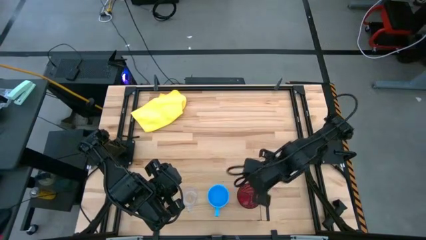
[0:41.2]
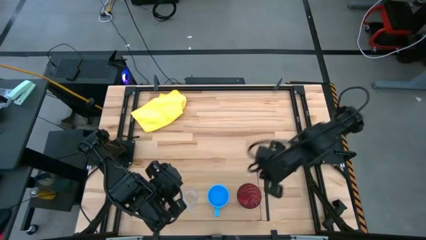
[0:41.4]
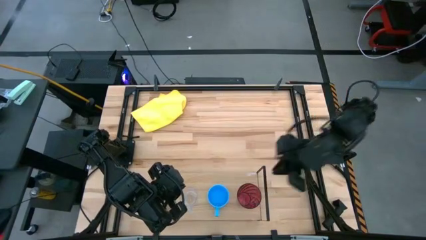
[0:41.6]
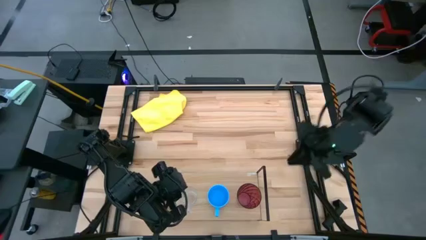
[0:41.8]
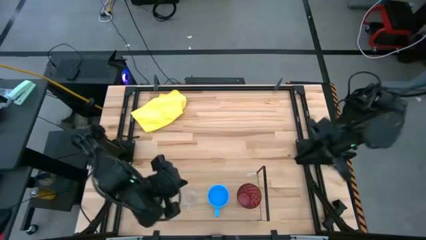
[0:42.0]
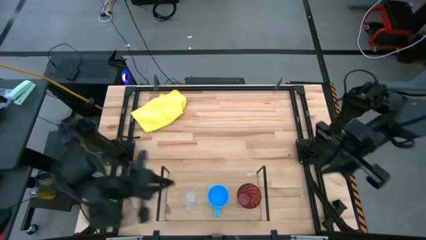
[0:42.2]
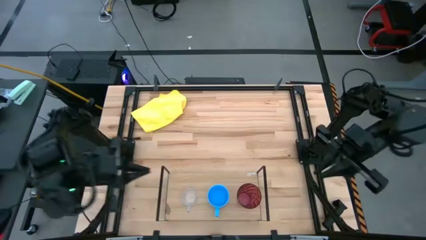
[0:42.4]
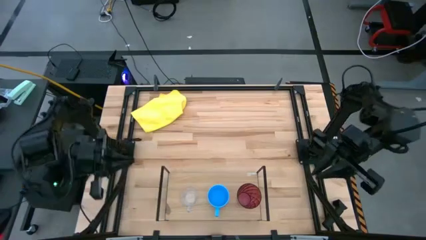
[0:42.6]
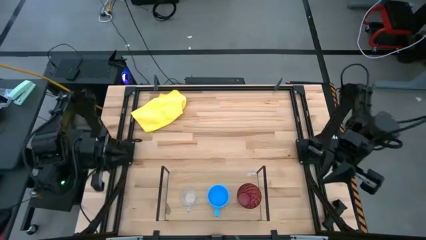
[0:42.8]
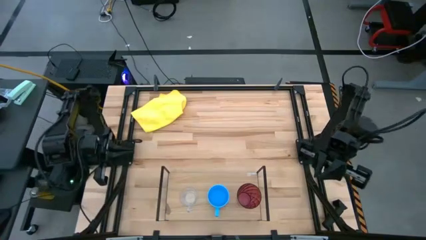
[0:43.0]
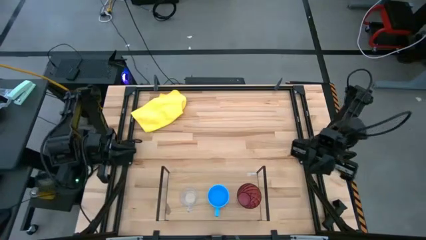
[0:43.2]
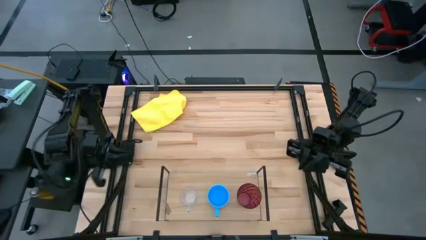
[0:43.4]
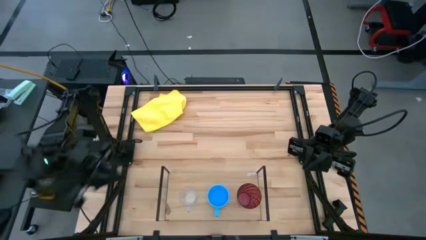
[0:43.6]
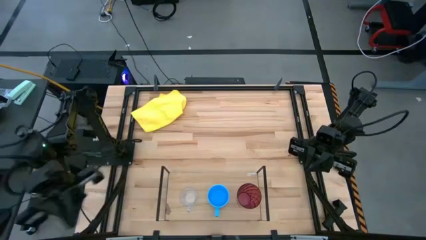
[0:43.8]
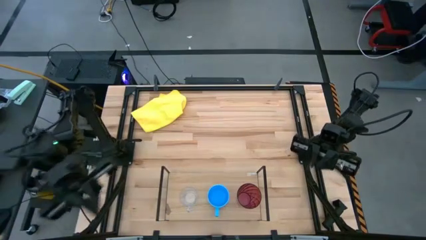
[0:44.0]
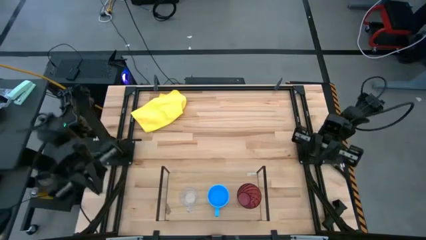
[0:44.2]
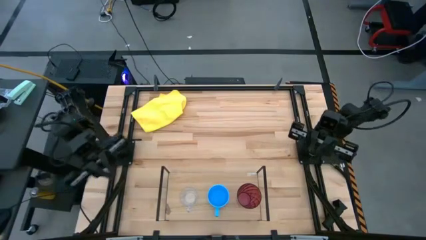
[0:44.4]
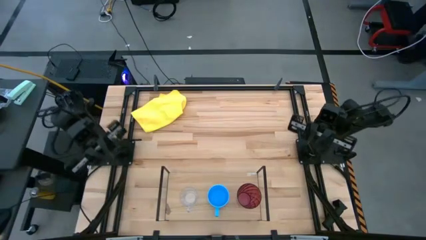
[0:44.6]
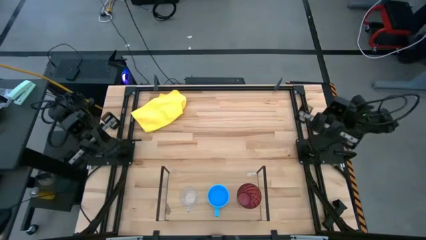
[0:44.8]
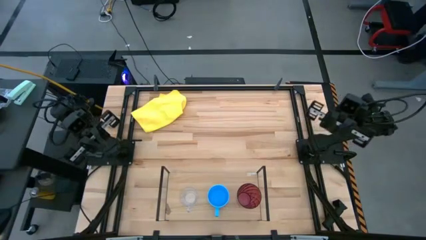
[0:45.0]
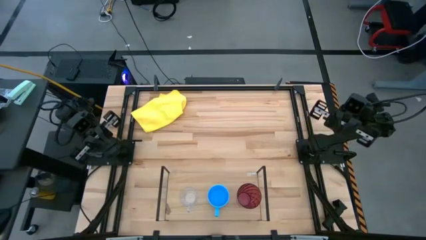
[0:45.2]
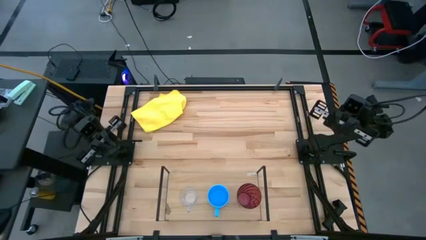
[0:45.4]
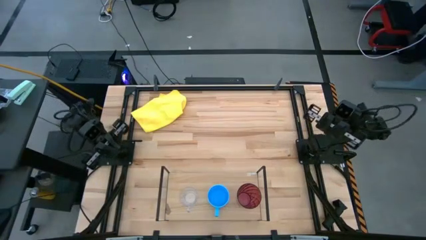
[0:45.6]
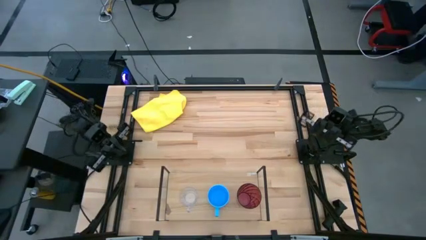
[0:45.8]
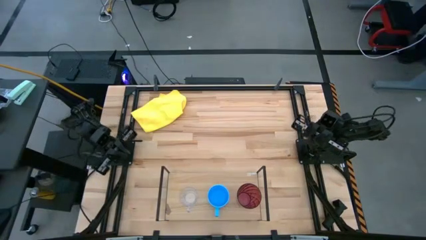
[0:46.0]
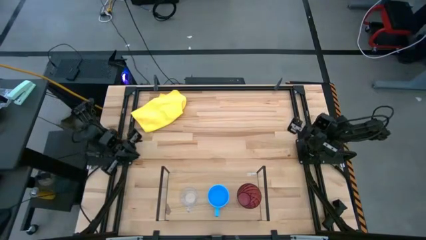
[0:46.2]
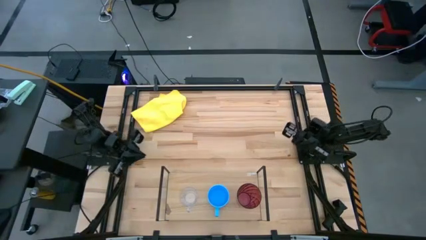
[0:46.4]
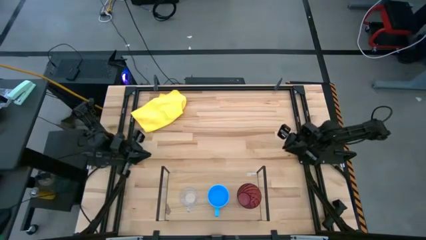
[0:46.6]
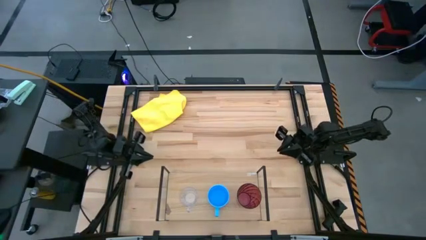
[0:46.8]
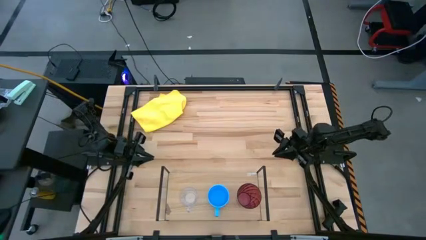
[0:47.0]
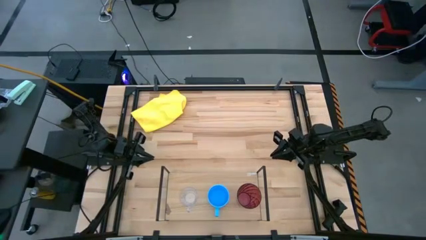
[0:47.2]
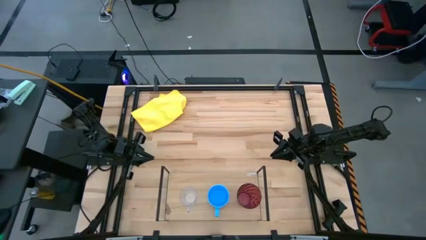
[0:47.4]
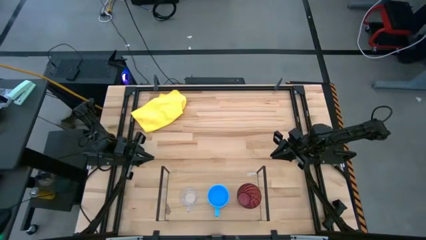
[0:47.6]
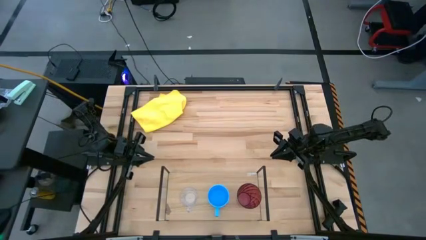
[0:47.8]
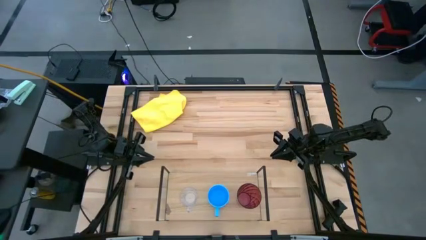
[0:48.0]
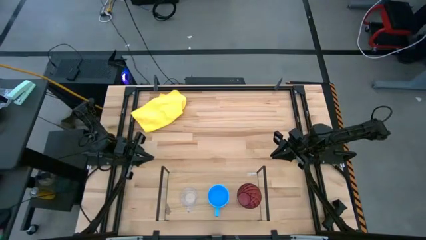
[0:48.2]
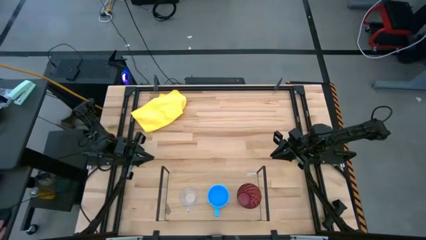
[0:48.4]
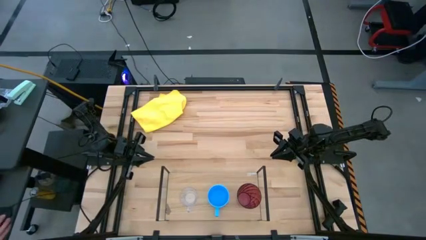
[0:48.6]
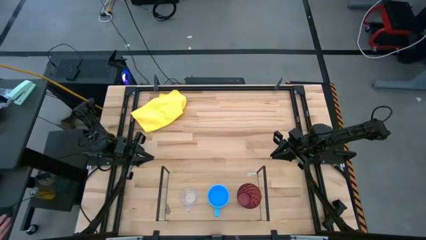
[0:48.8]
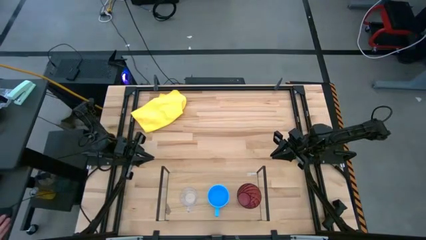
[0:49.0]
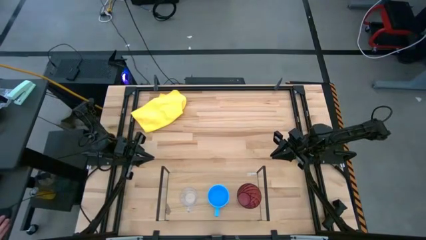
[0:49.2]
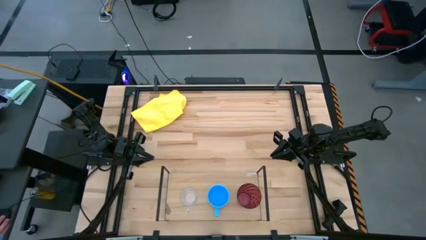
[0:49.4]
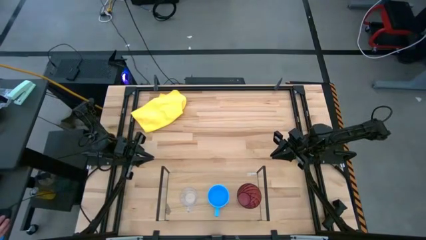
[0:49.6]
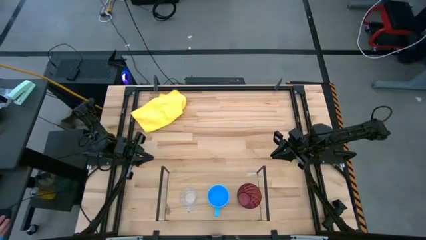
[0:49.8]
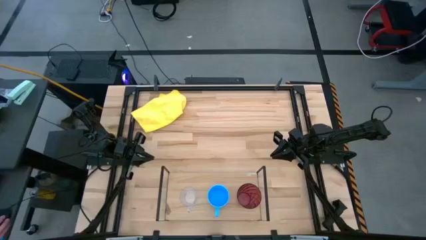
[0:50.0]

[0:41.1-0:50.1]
Task: Stack small to large cups/mugs on shelf
Return to Home Position

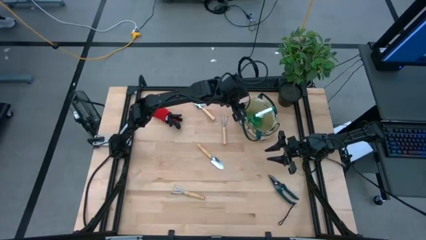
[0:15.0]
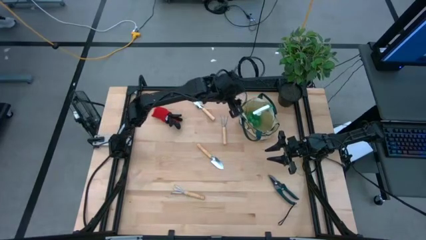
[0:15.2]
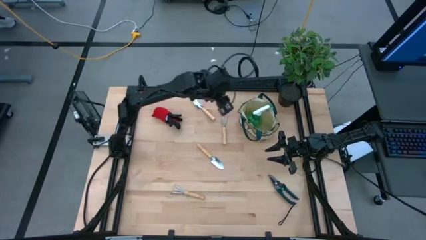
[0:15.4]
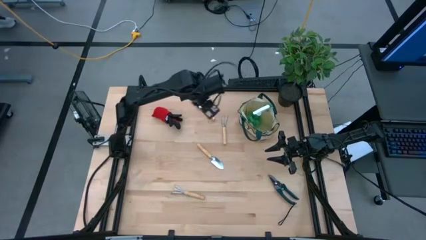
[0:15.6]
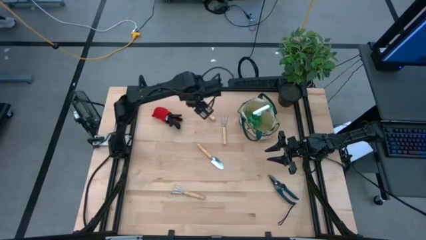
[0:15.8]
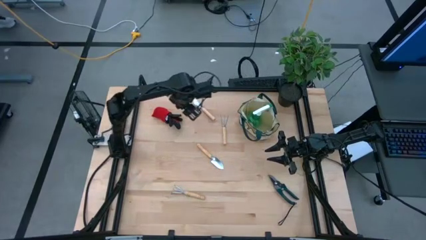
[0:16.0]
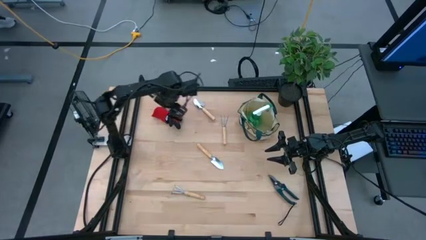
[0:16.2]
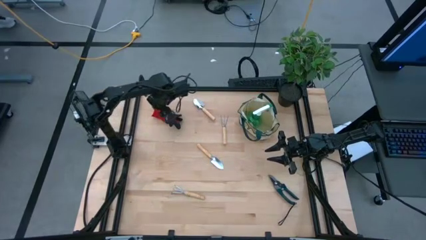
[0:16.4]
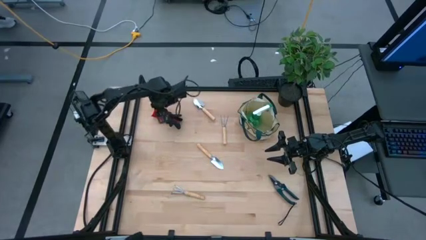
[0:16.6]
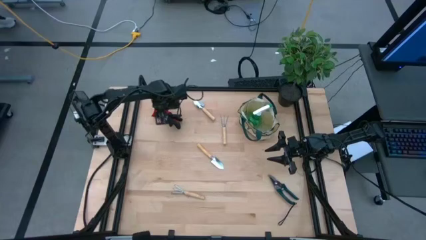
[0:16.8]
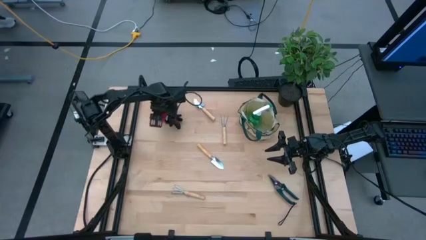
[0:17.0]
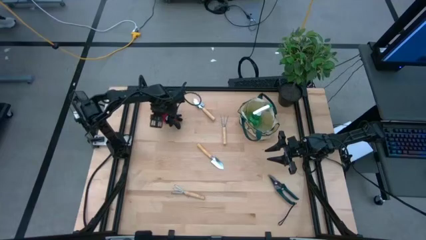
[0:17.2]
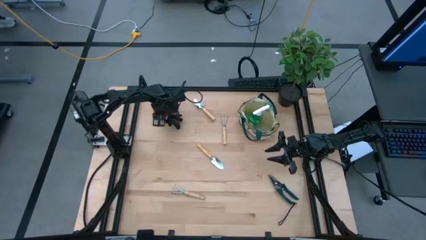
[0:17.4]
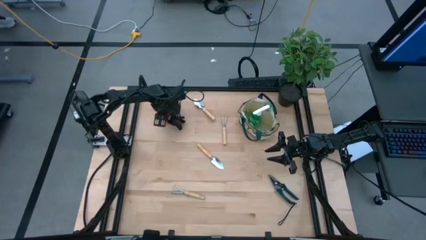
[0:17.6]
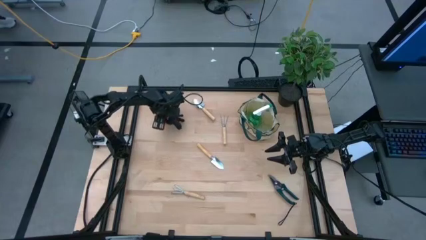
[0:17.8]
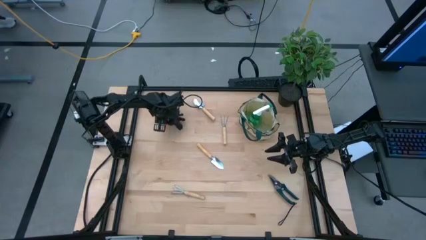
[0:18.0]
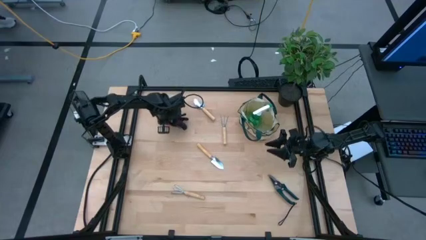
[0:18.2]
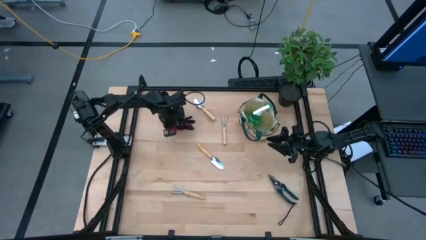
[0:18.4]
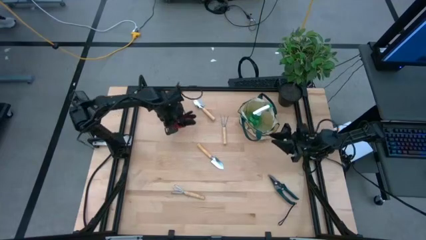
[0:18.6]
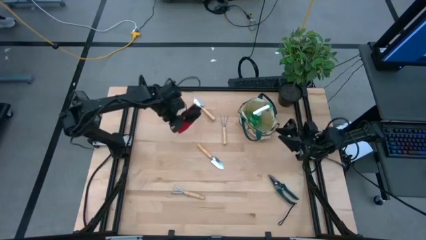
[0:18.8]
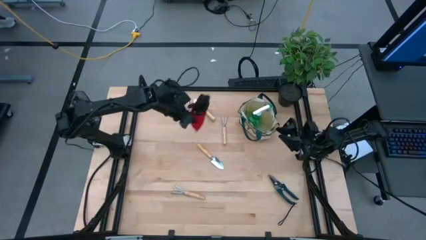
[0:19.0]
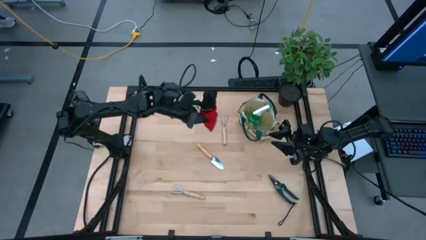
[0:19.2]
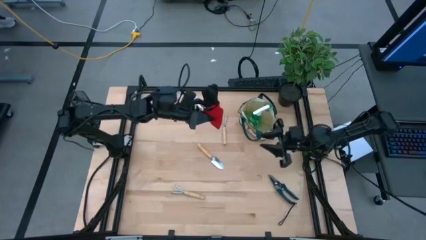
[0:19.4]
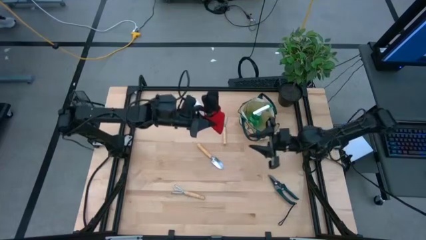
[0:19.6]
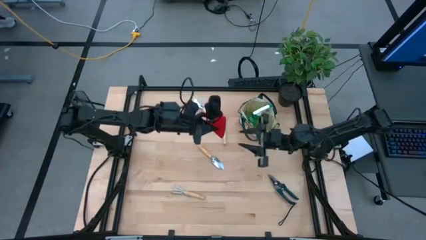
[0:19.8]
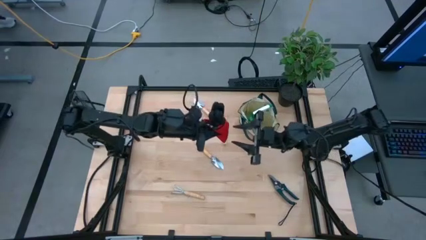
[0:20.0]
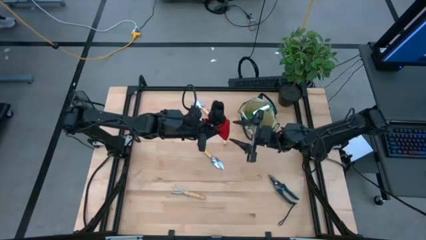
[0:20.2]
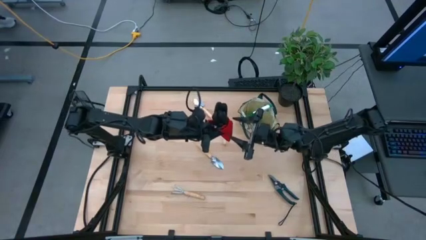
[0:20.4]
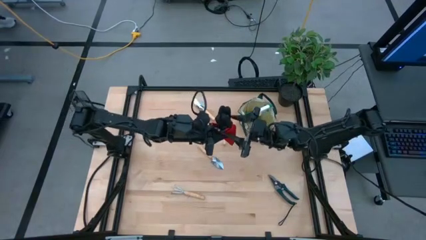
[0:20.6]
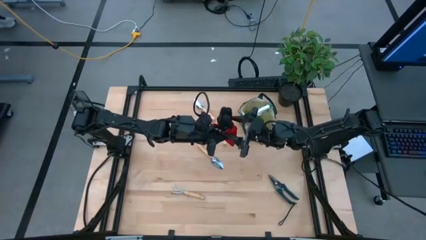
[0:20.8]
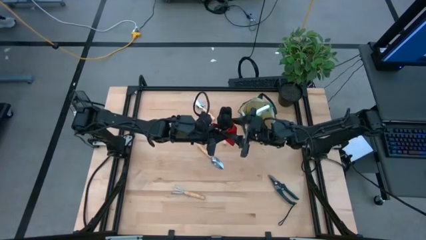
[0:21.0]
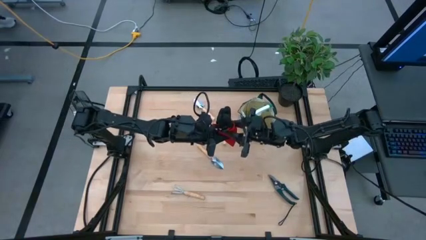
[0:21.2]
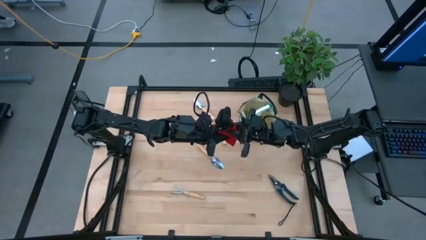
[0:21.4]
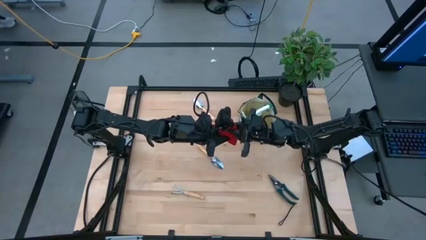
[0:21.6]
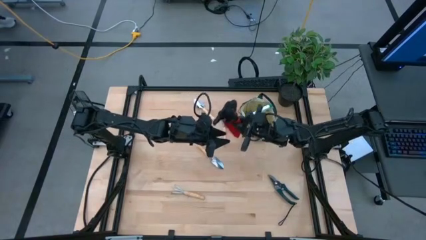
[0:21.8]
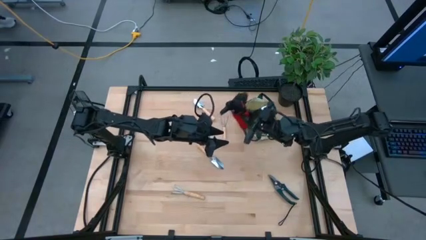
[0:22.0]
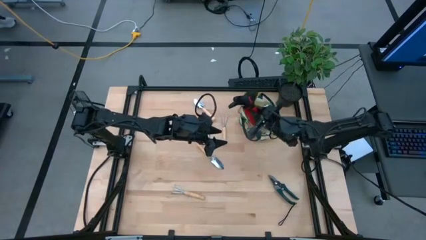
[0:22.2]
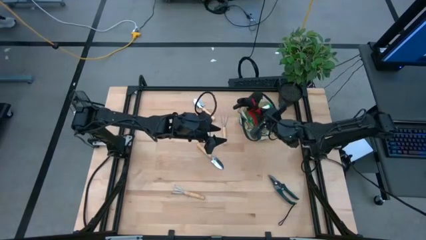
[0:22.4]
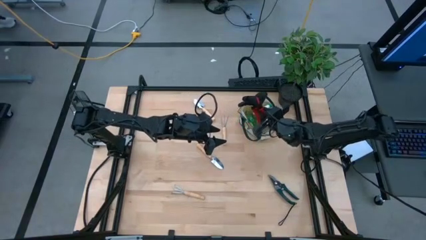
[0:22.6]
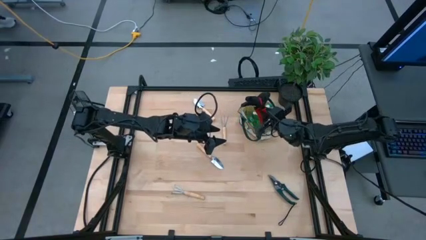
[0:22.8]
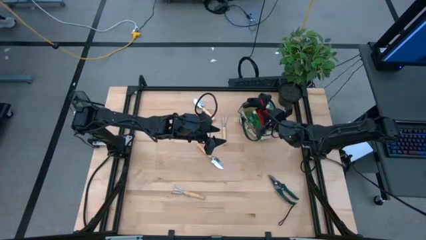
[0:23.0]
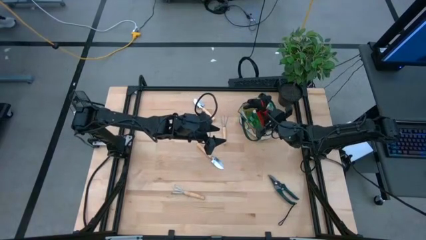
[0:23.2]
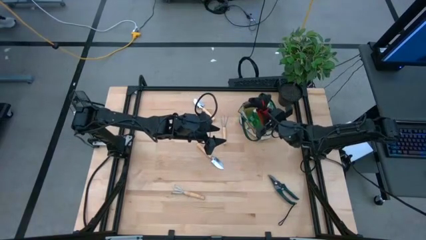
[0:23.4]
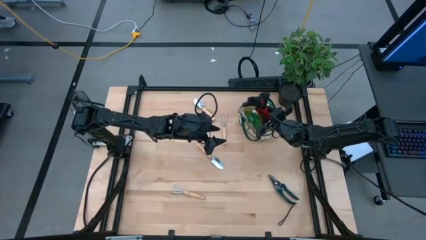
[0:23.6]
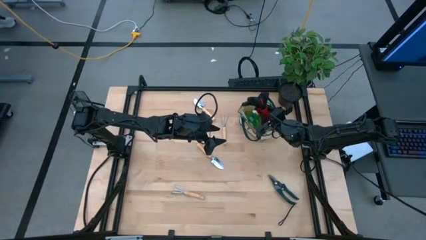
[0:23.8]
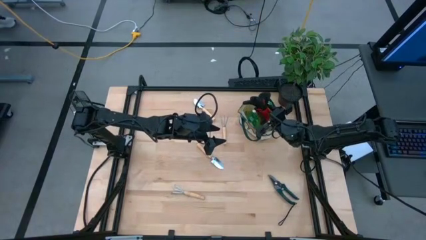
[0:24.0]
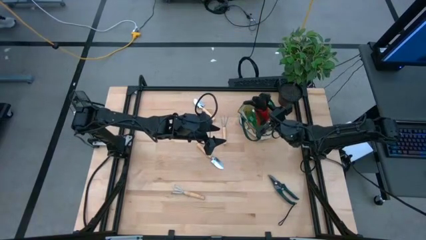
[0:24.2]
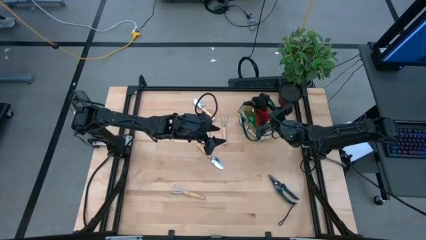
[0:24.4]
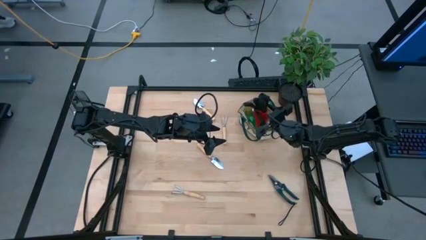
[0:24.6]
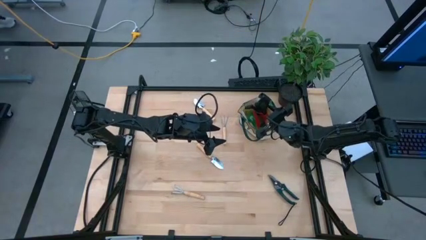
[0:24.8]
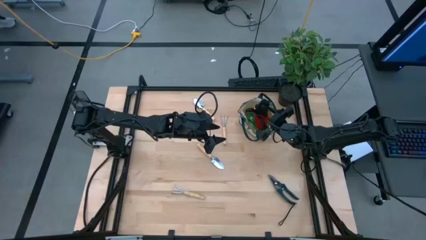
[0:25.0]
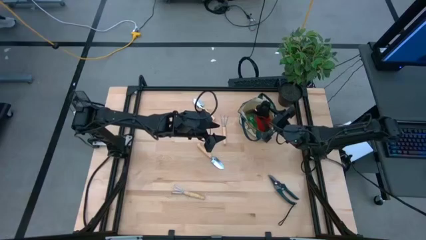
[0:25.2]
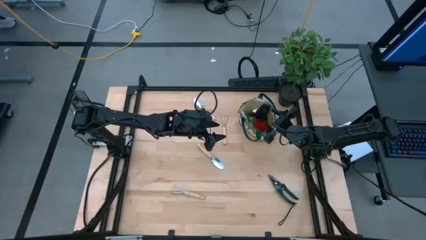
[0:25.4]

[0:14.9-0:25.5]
Task: Pick & Place Garden tools in Gardening bag
Put the pair of red gloves into the gardening bag
